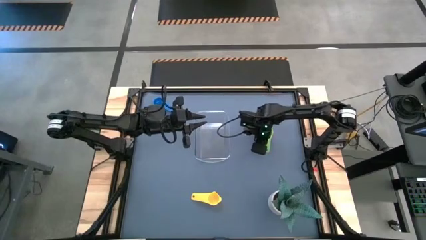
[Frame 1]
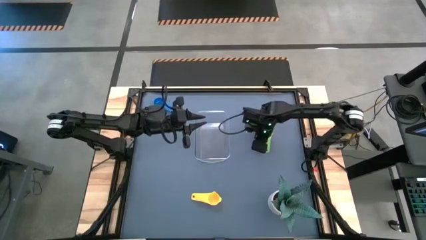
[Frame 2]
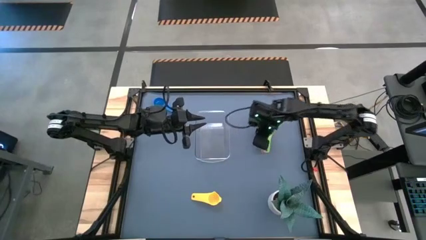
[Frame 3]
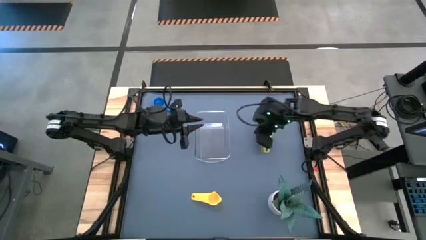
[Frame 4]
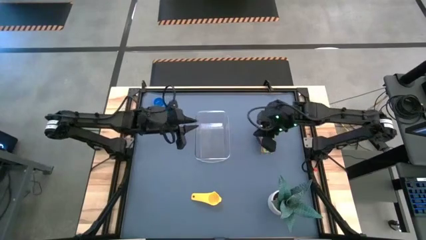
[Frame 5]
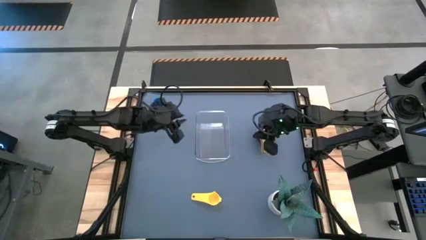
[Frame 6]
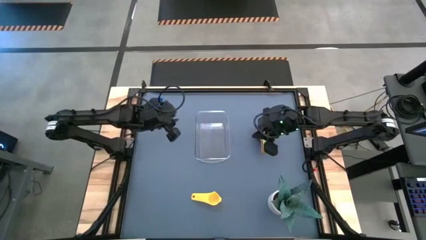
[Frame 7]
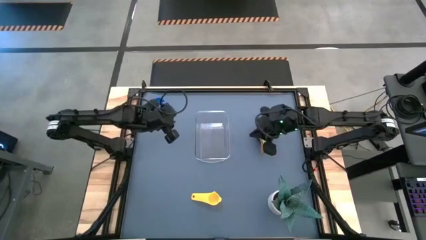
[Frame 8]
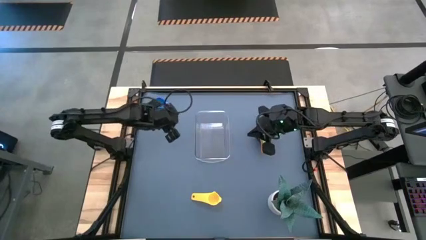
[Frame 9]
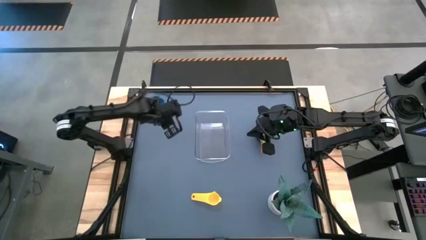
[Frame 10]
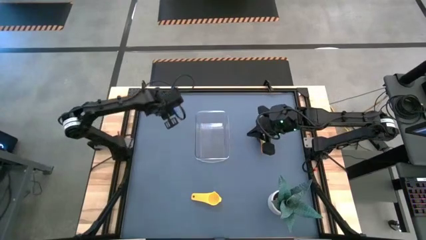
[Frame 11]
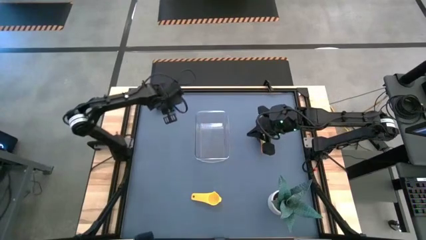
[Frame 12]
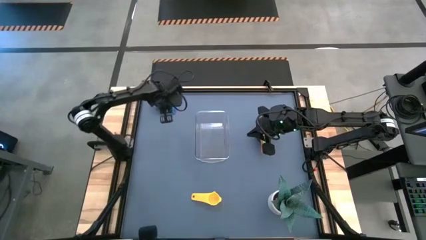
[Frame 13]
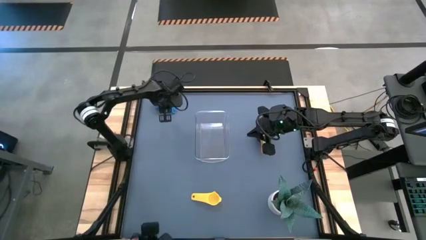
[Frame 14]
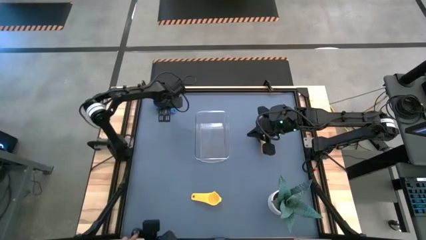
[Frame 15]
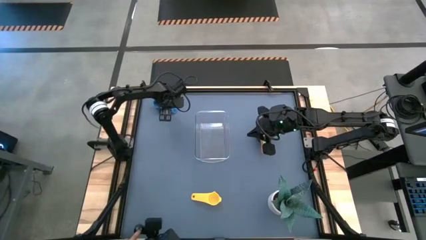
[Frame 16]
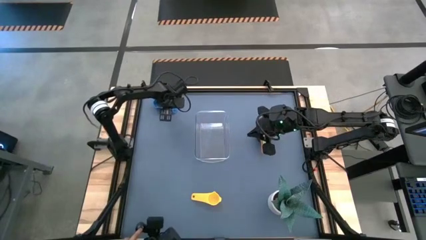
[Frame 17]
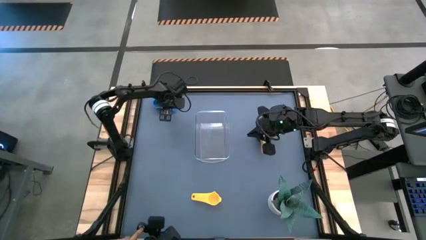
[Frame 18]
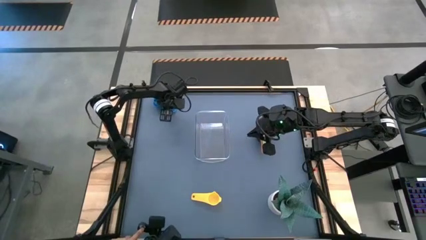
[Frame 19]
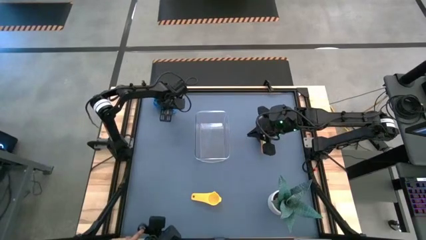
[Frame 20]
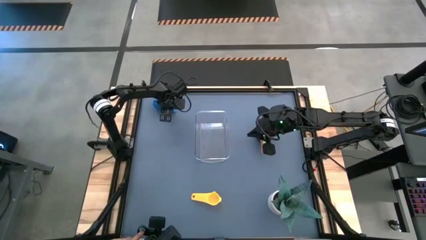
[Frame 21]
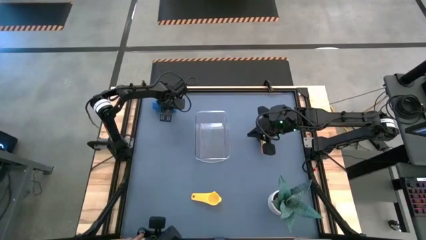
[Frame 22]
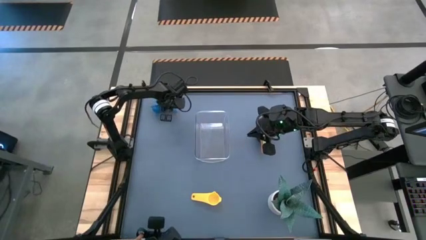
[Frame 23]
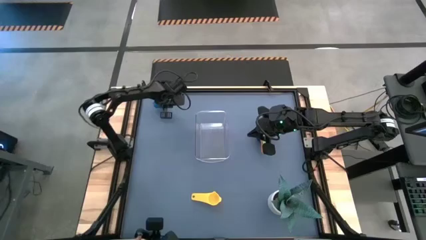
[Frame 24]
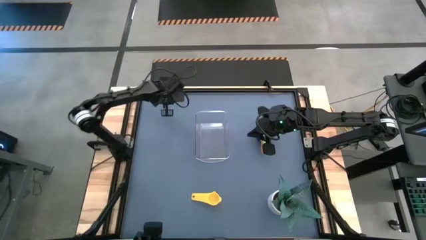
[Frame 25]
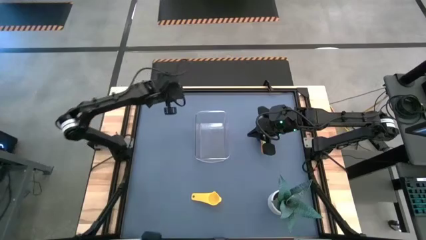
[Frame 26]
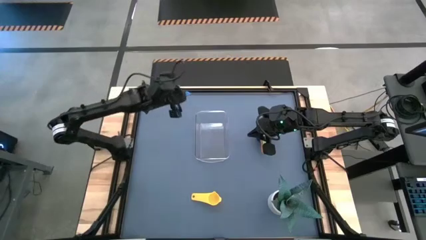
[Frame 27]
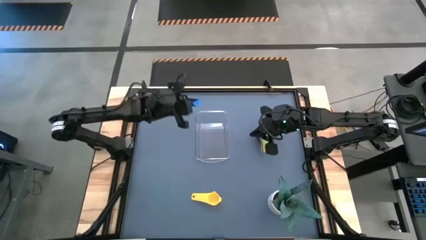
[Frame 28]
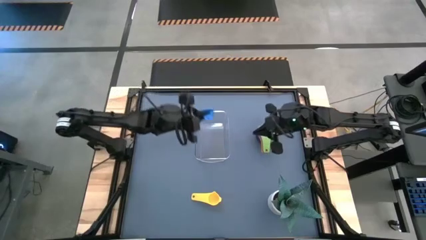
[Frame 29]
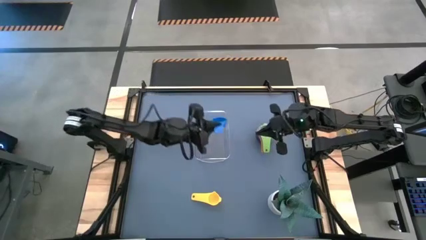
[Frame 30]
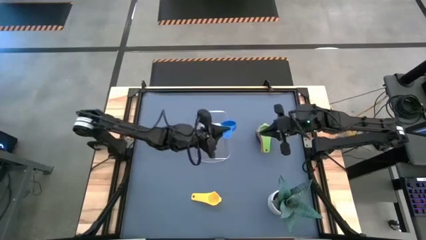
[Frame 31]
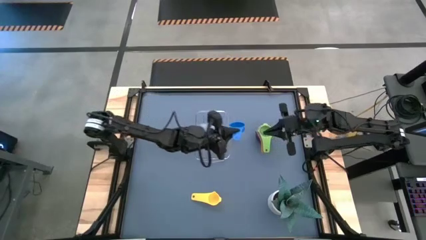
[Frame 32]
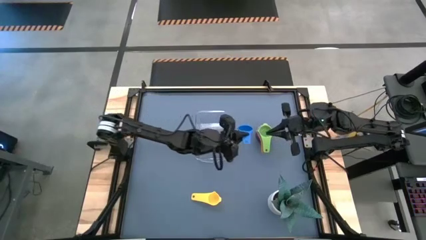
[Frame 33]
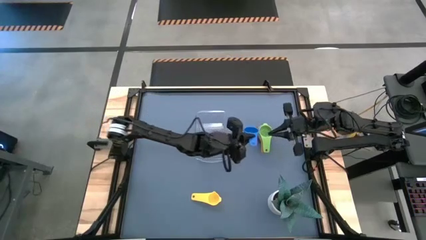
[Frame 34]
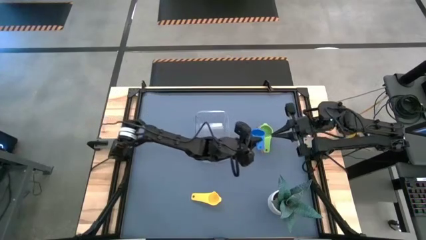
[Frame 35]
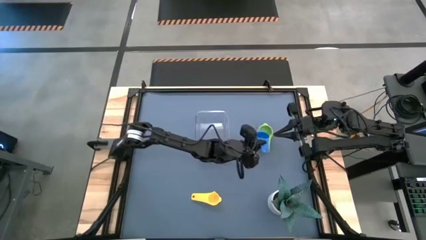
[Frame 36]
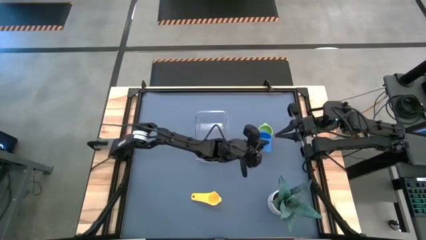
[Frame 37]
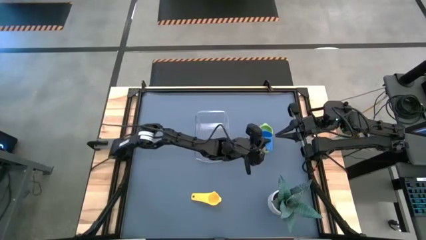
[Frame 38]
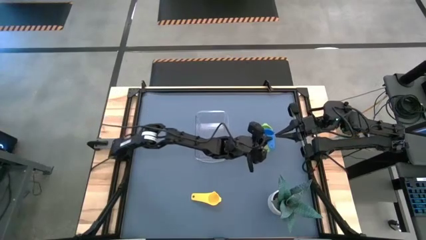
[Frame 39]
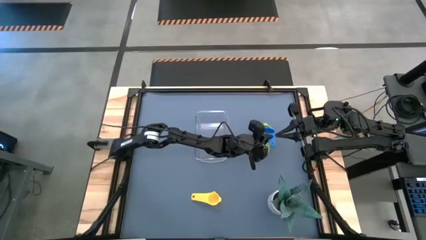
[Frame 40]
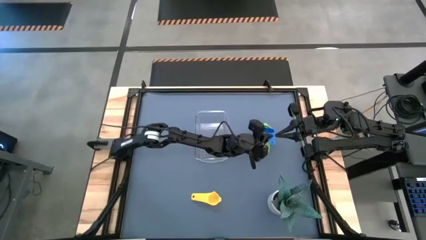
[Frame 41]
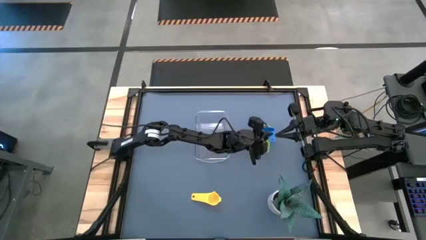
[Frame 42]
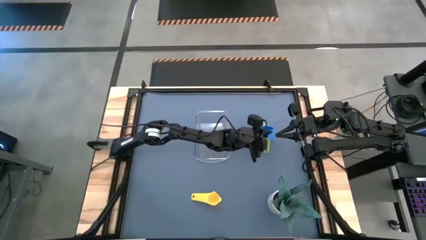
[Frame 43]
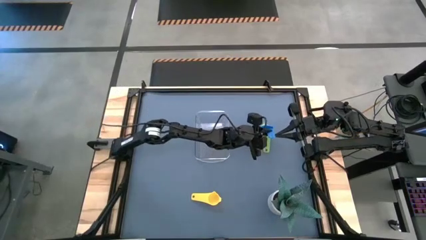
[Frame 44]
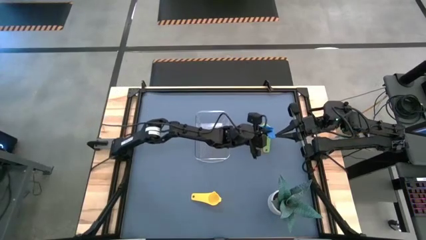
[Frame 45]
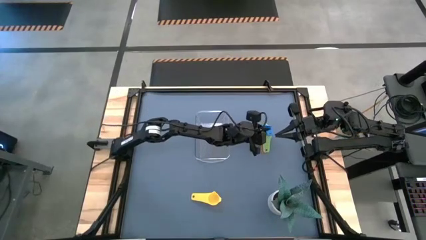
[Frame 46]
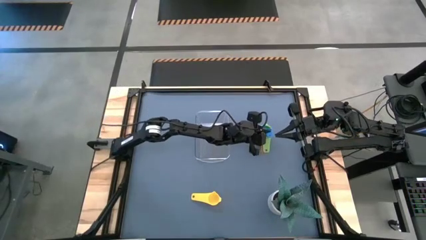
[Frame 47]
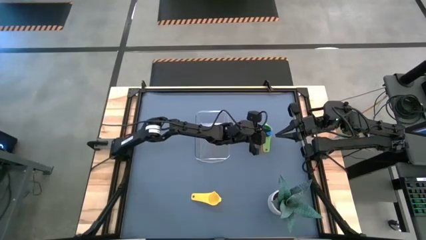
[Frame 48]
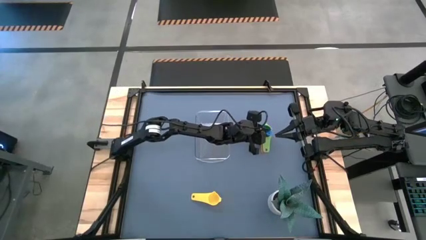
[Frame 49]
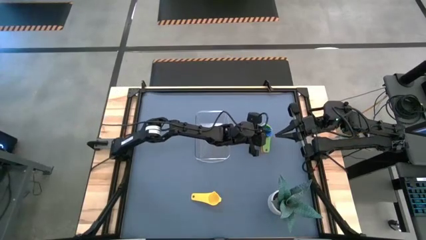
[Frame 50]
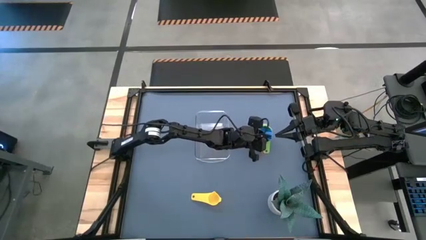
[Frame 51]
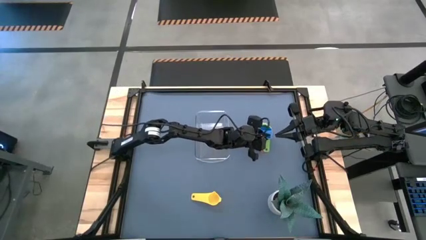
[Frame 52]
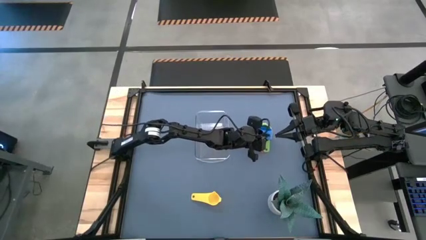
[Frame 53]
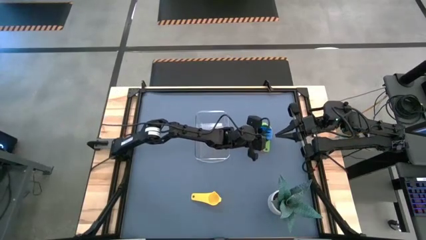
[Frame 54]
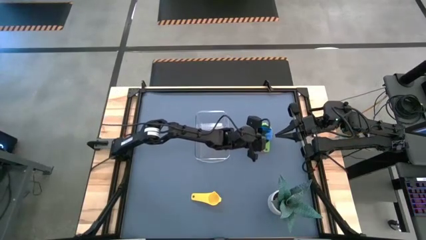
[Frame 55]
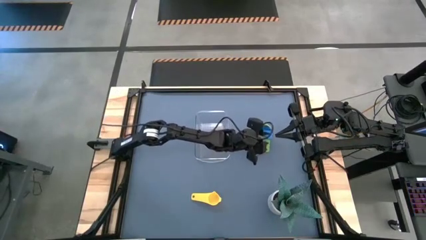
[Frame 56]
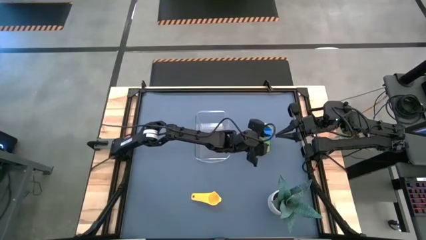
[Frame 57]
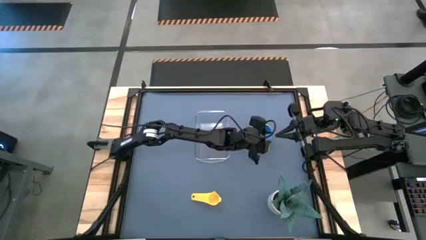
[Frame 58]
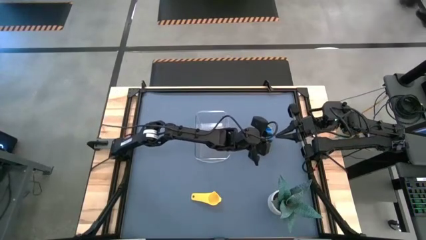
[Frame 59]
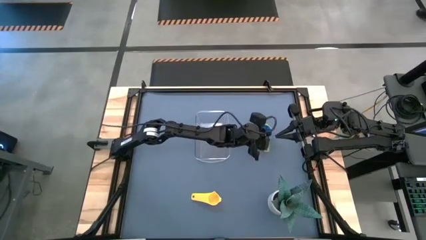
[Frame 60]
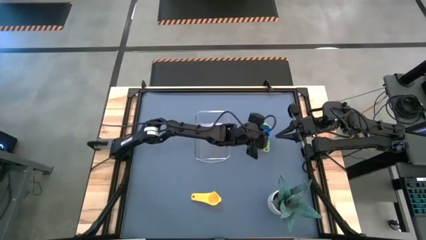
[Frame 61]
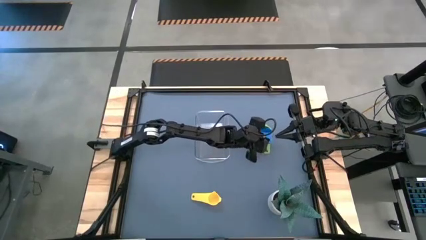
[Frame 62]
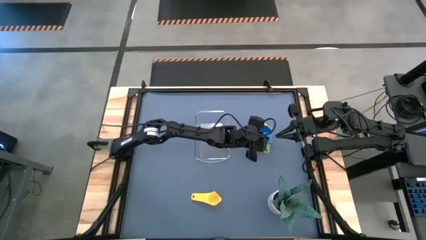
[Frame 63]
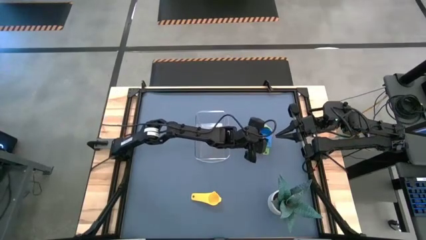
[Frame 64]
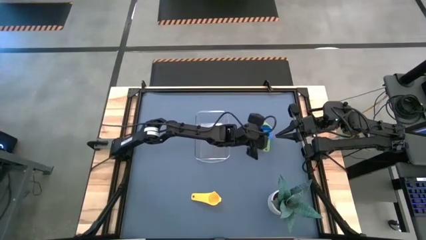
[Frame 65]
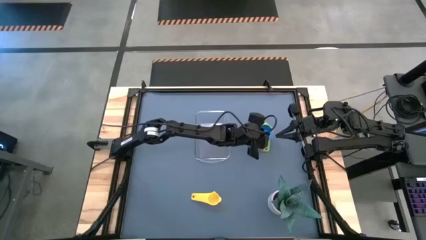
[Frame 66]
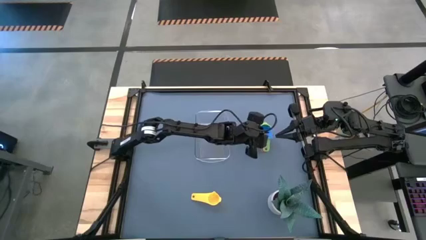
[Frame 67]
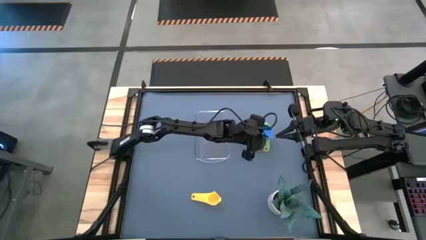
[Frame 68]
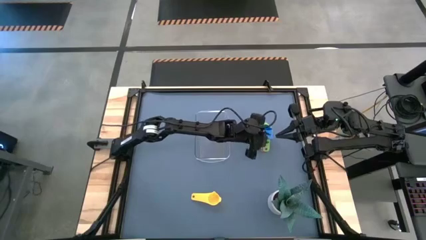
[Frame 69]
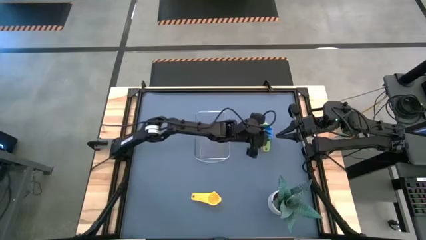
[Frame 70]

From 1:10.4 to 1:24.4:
Task: Nest measuring cups in basket
Stack the blue measuring cup on top of the green measuring cup
